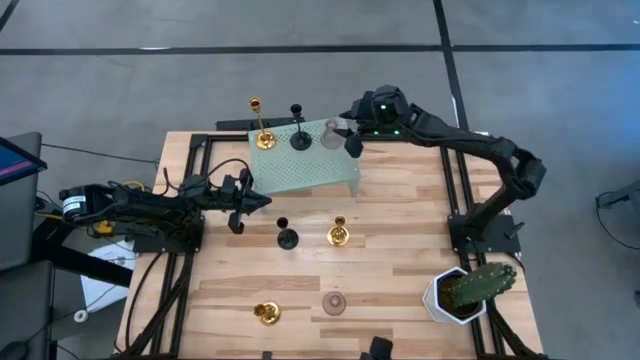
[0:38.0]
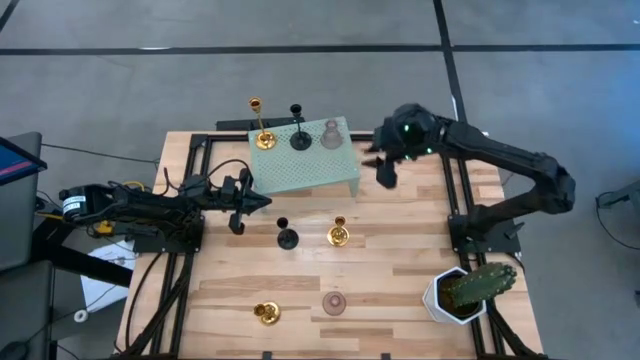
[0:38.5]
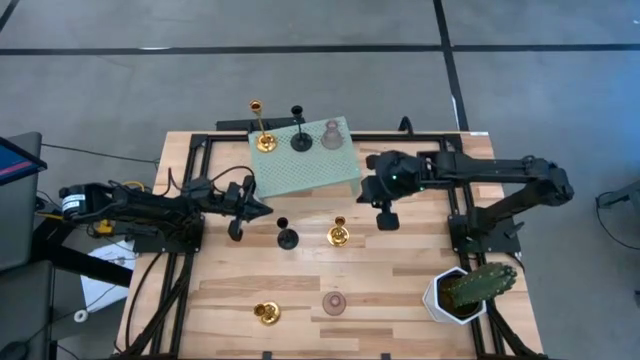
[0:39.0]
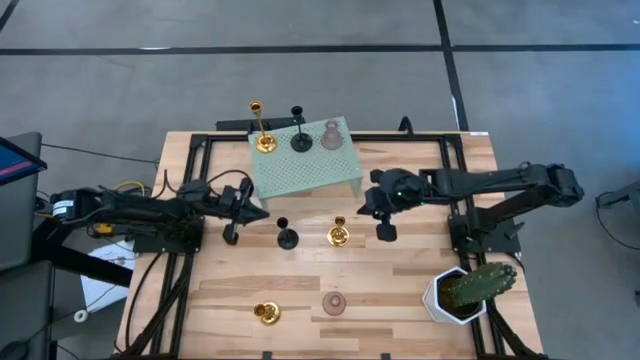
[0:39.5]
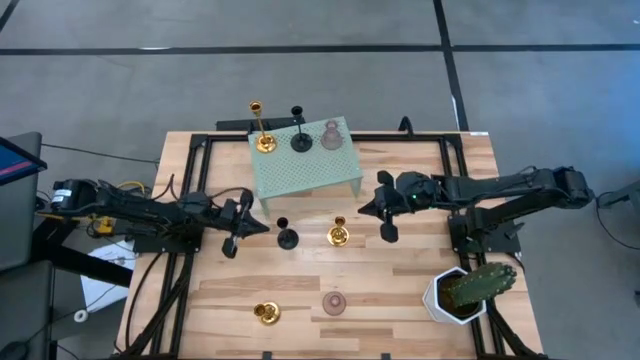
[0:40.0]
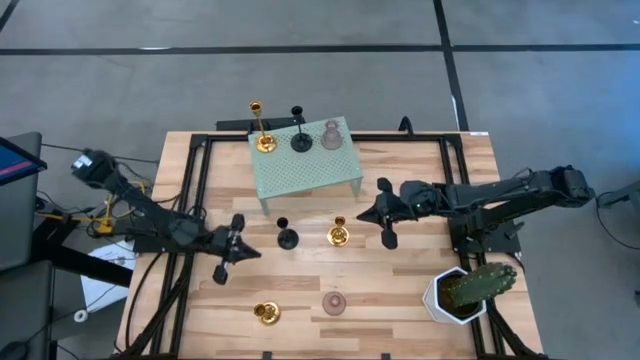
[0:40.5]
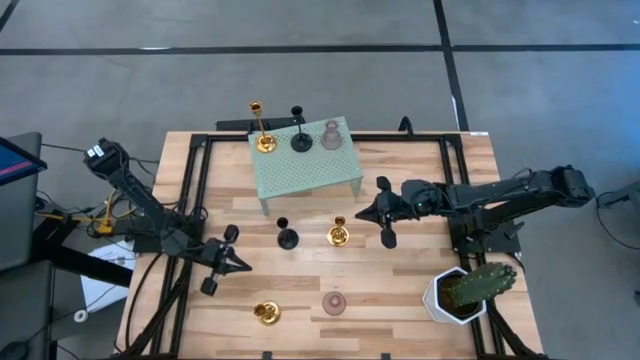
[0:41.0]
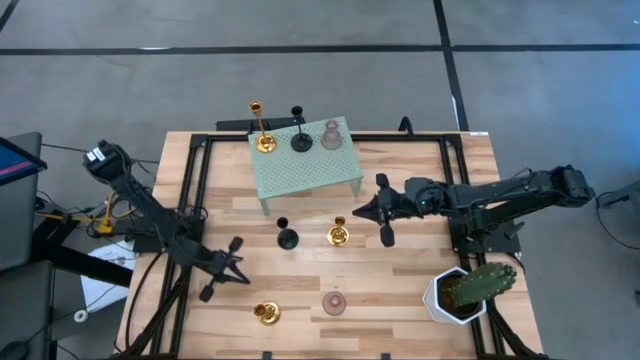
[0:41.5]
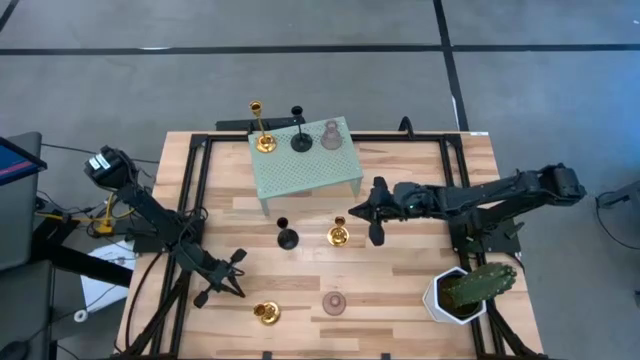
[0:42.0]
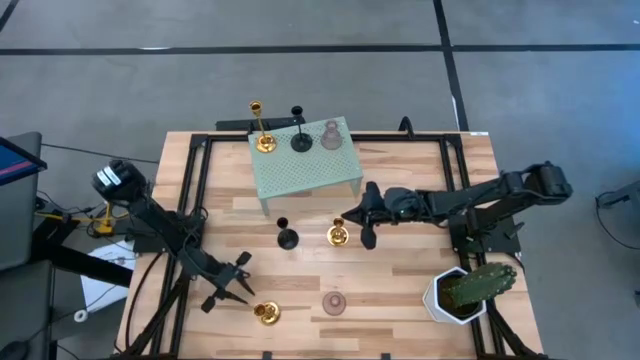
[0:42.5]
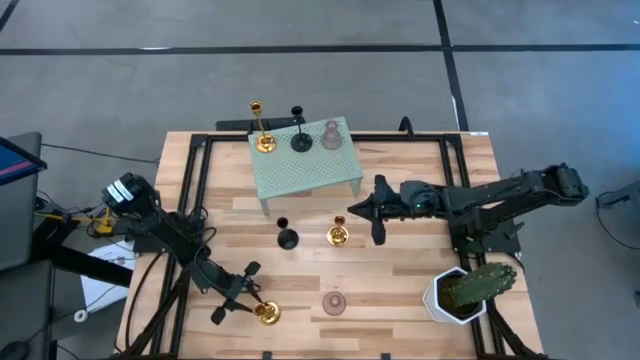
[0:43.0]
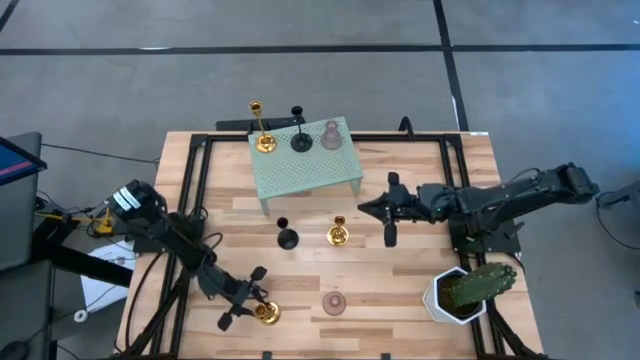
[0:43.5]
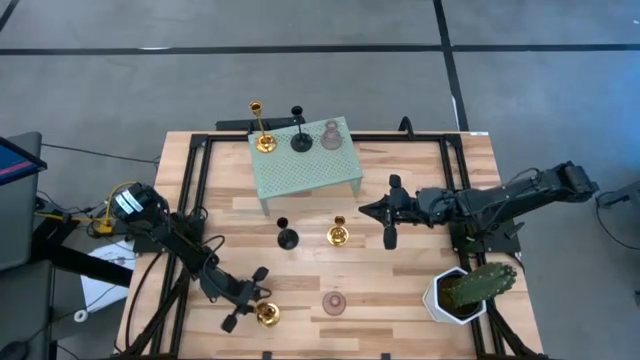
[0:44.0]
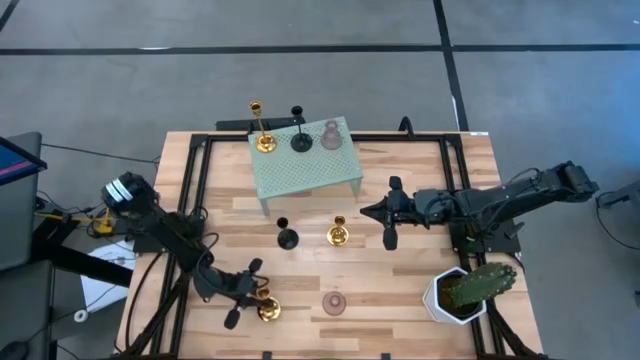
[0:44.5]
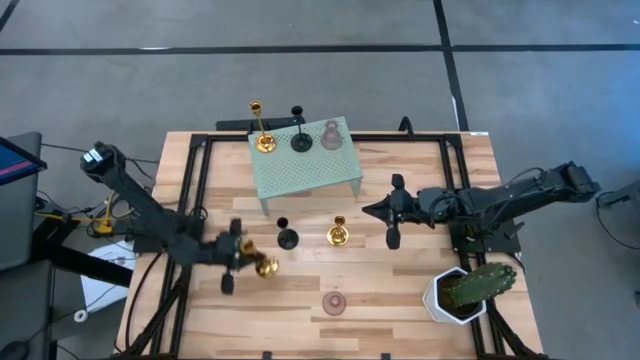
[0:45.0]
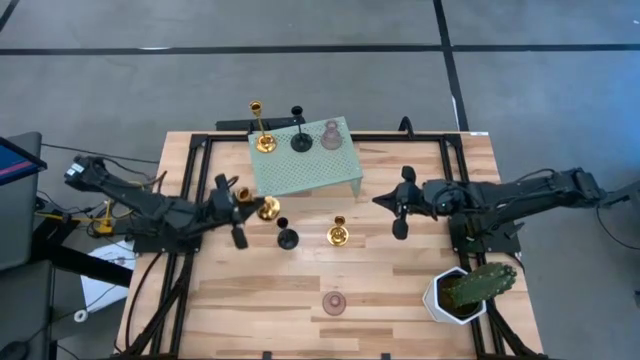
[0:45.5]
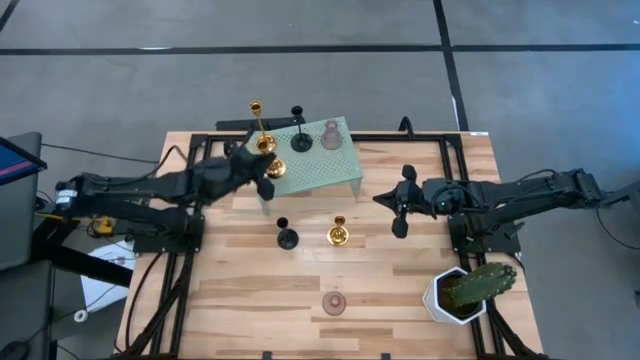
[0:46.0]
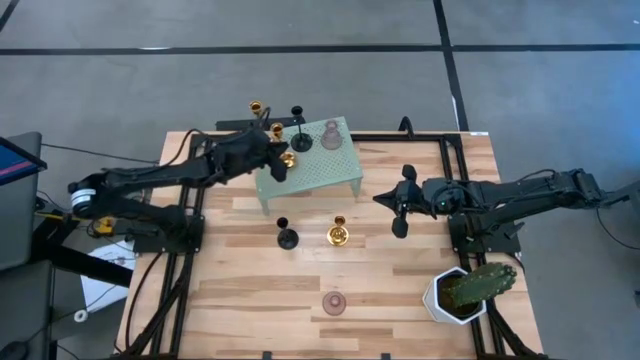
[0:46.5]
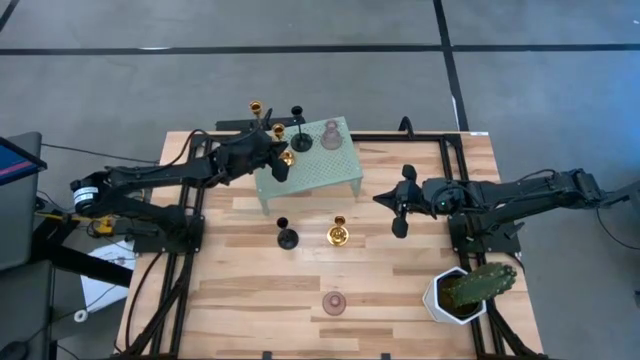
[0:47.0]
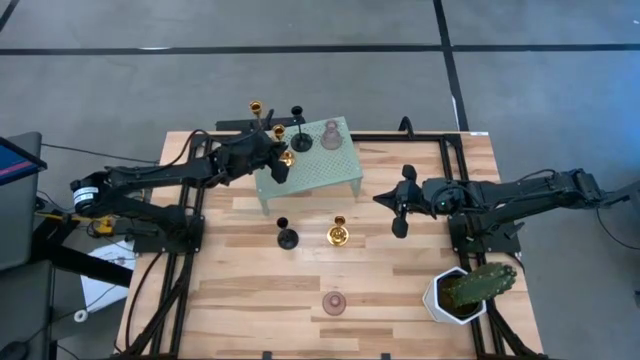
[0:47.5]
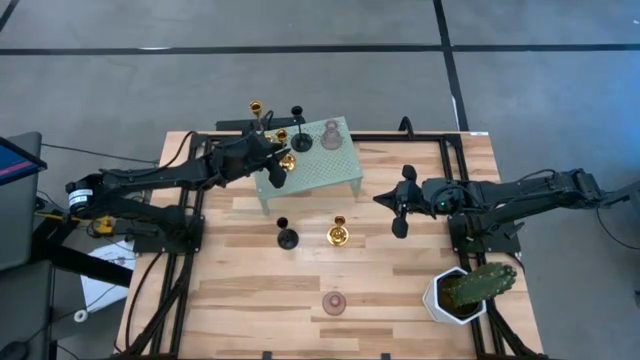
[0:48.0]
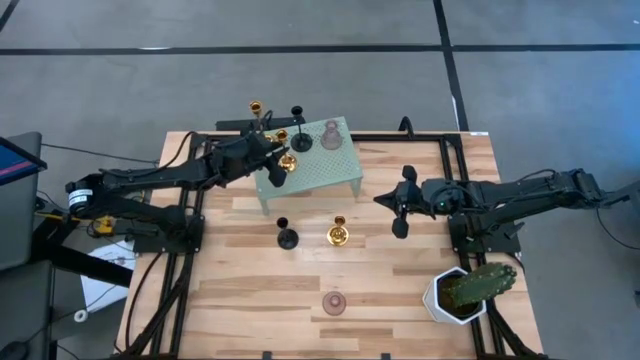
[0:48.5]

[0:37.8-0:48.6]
Task: Pick & Place candle stick holders
Put the bottom gold candle holder on the shelf

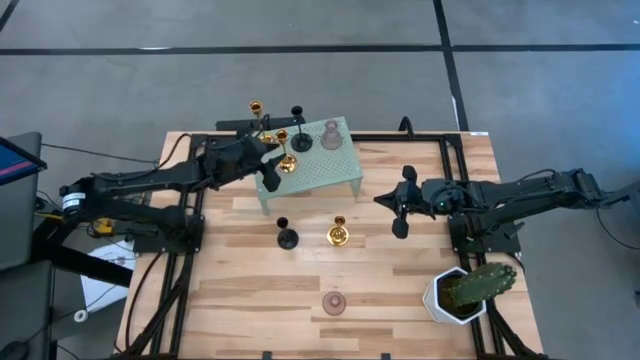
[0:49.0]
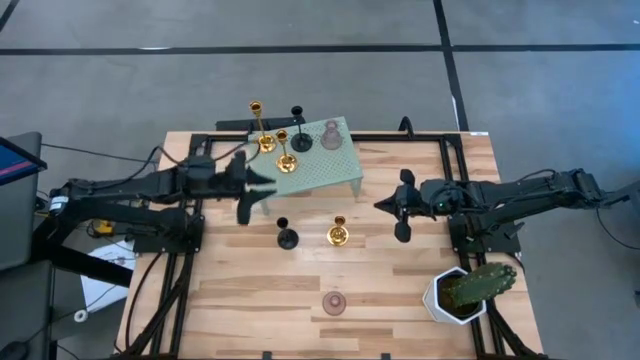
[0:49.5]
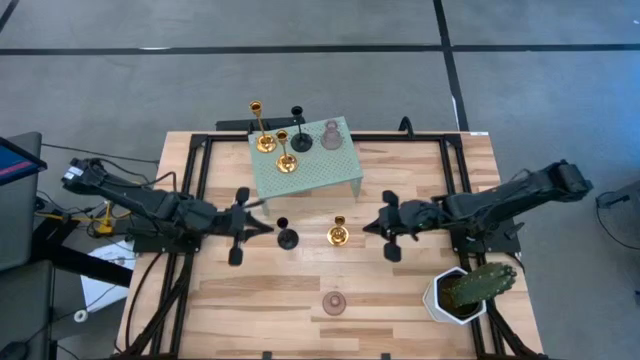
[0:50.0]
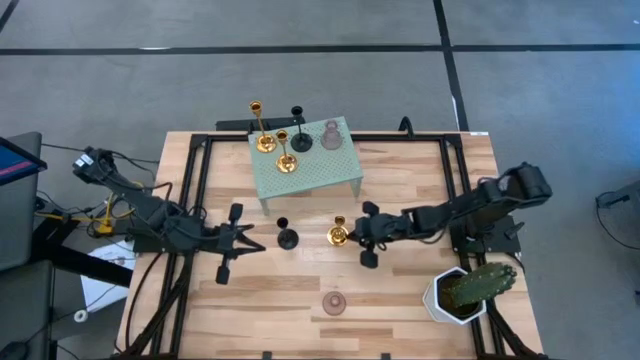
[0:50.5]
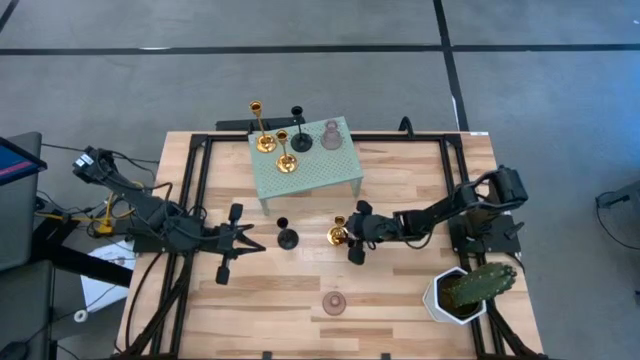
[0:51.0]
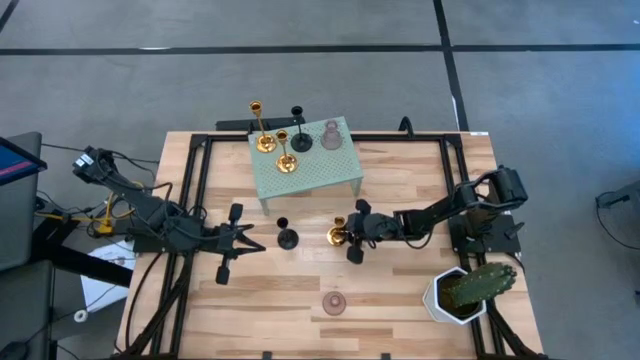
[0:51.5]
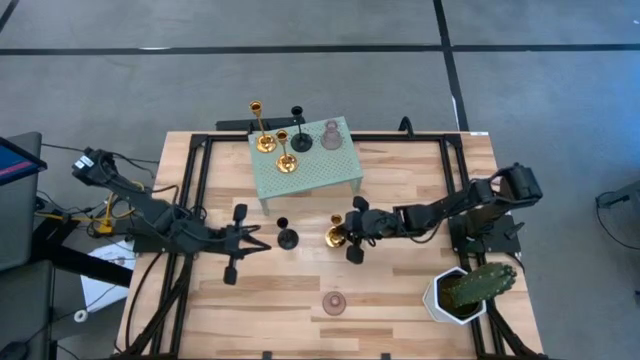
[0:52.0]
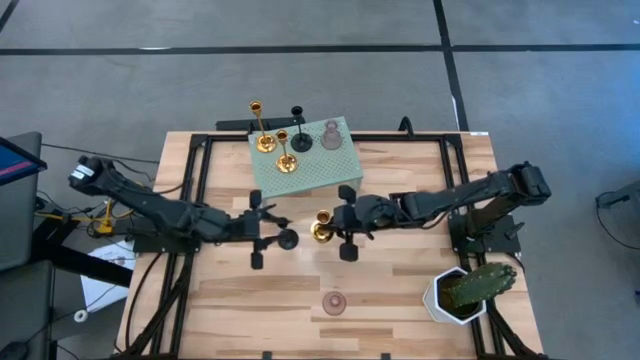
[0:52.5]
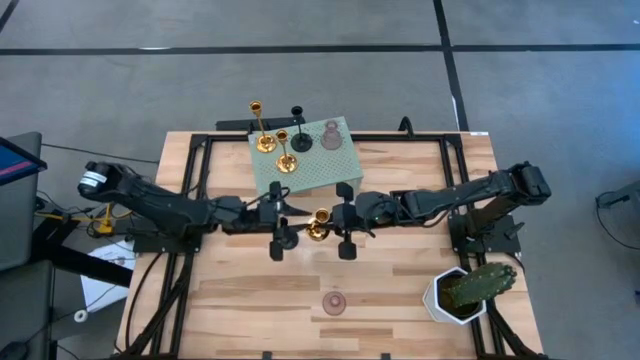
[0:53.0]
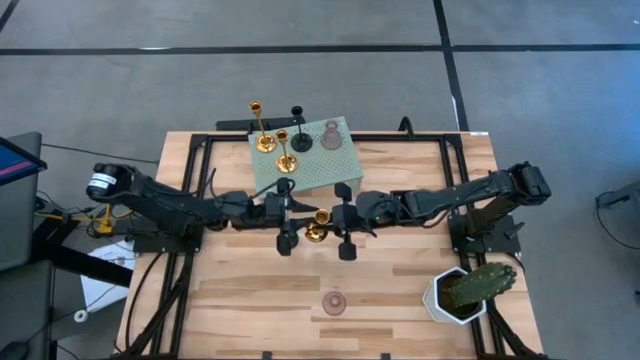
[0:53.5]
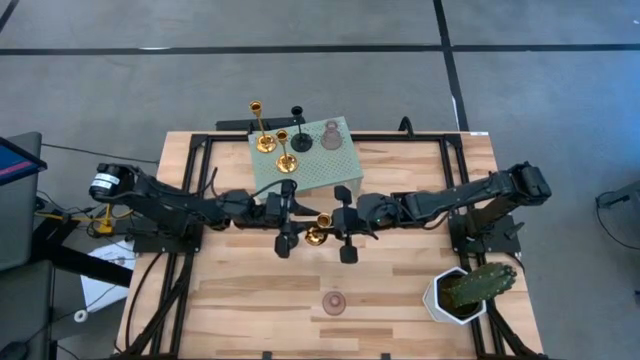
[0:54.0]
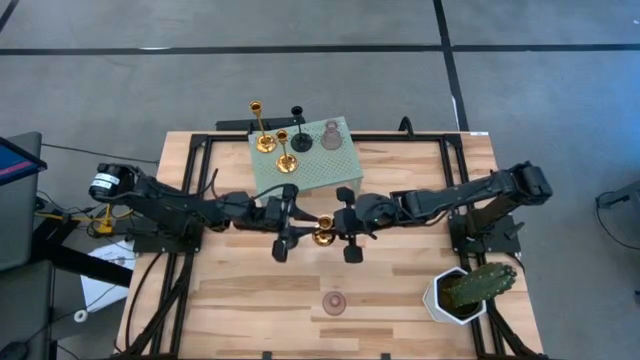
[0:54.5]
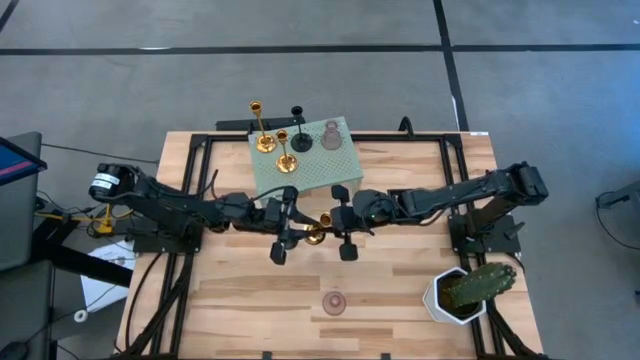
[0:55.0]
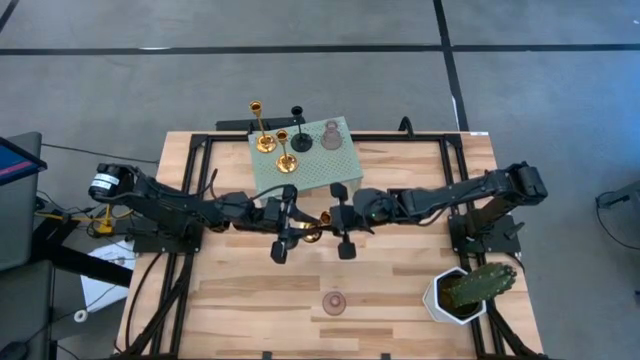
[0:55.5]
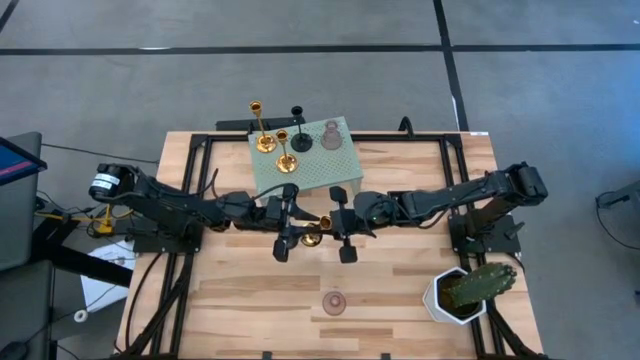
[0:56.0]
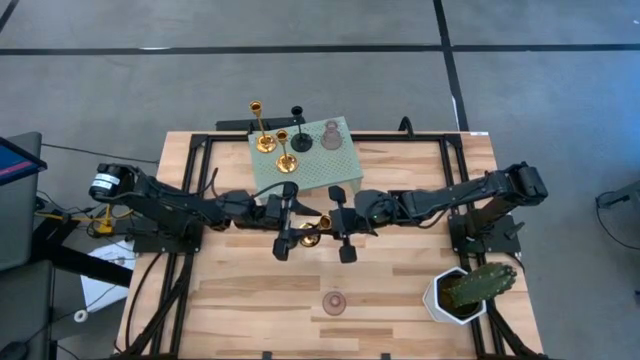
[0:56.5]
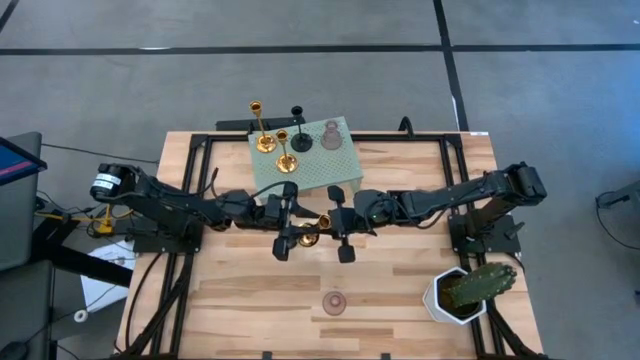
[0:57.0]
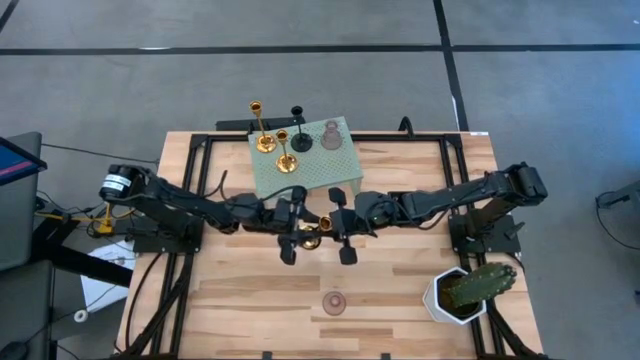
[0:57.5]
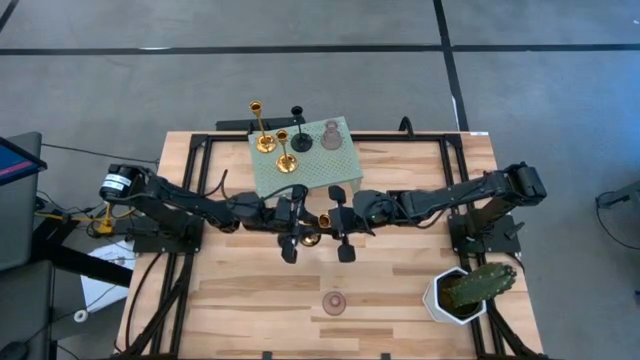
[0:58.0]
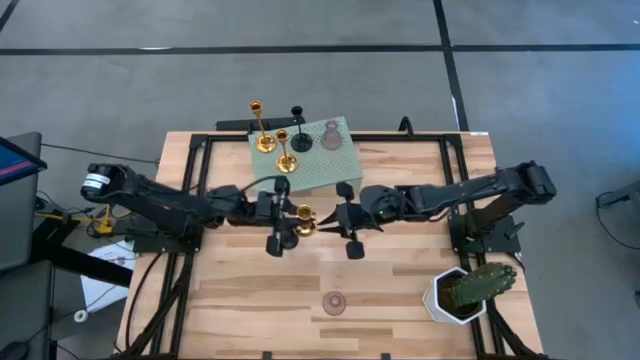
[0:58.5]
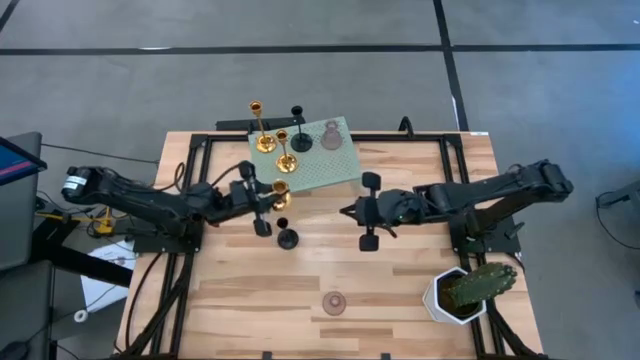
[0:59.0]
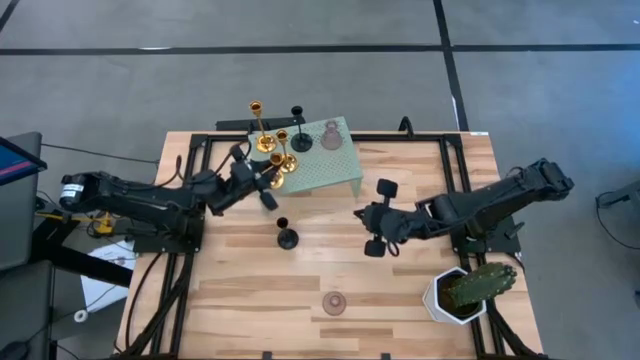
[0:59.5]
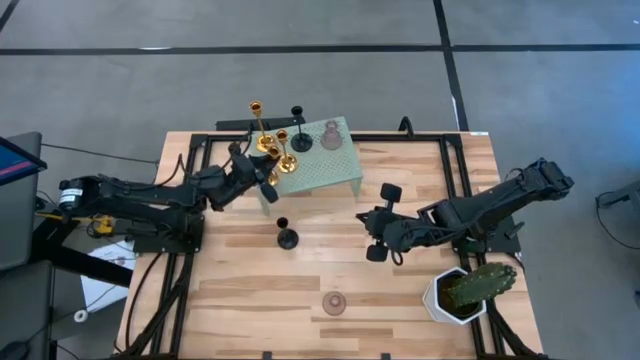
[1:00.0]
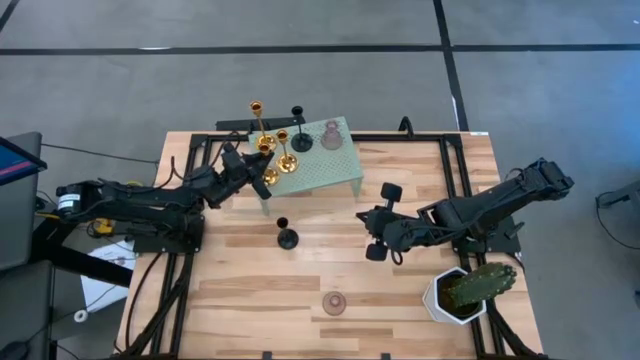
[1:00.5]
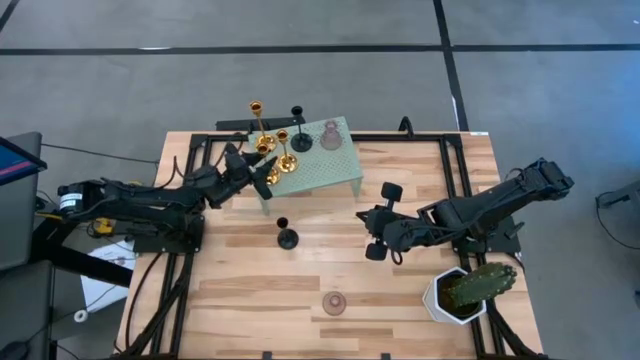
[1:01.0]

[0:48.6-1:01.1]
Put the gold candle holder on the shelf
